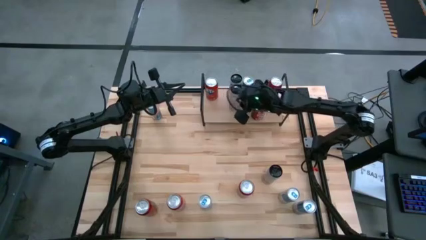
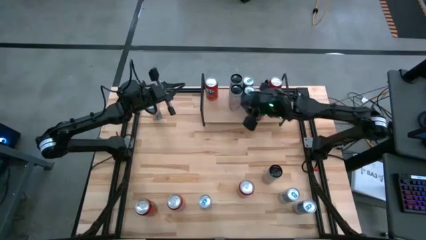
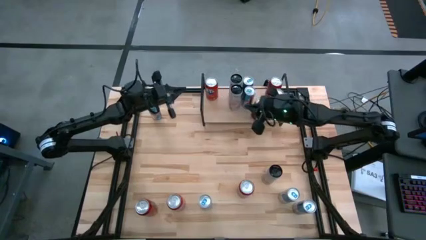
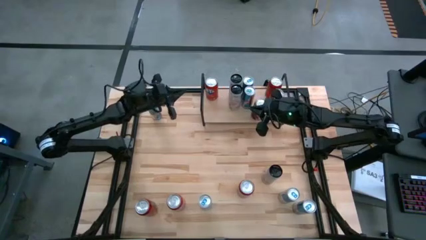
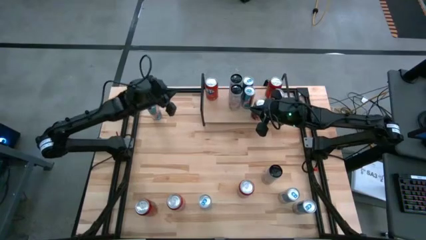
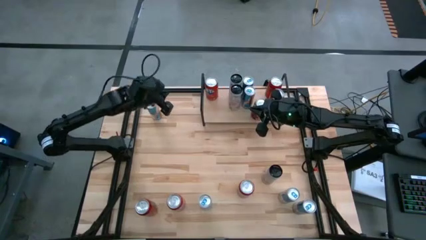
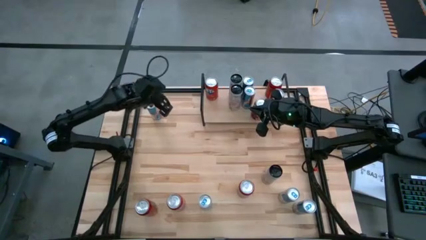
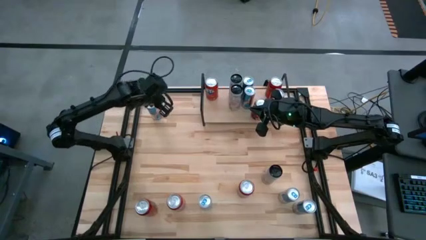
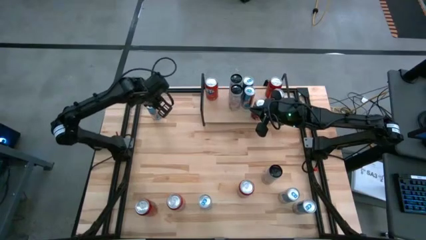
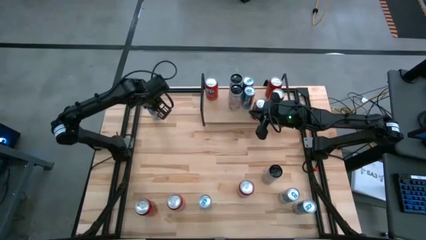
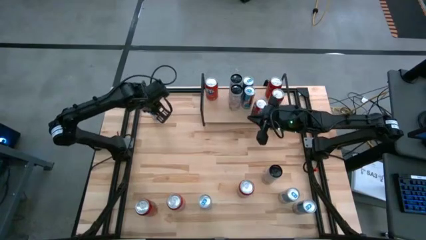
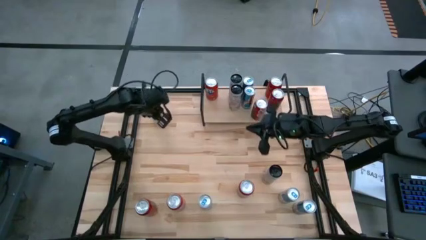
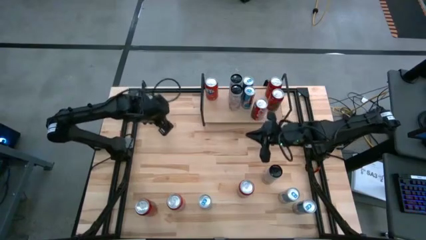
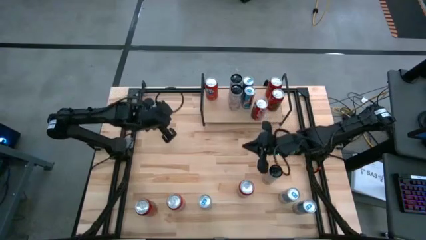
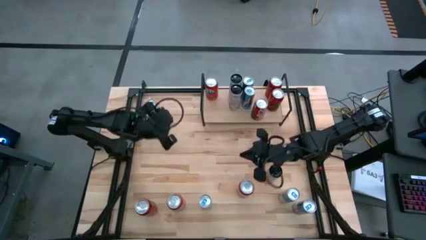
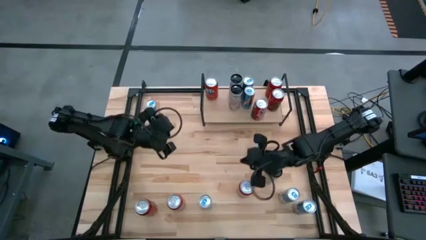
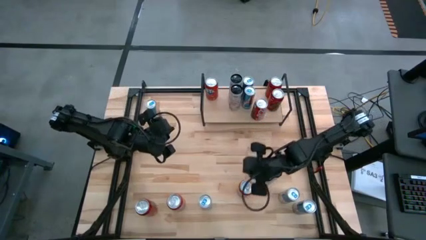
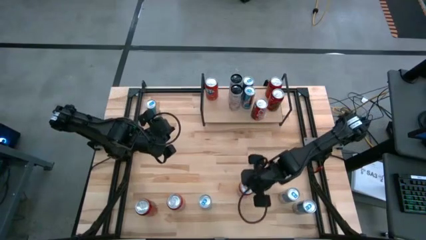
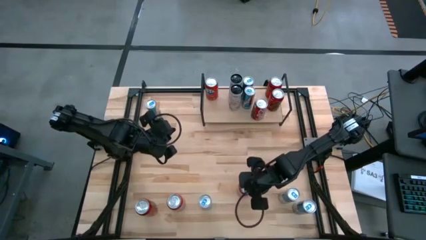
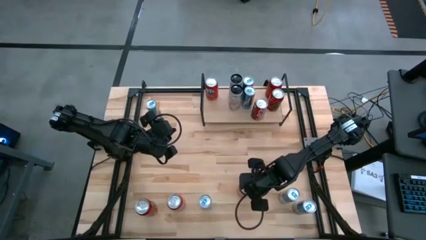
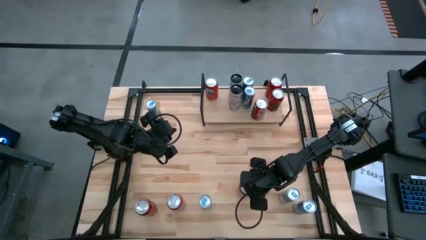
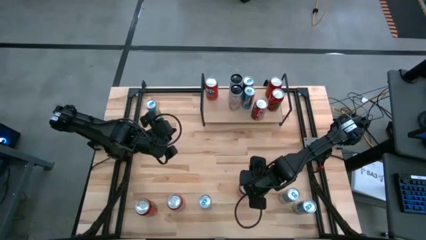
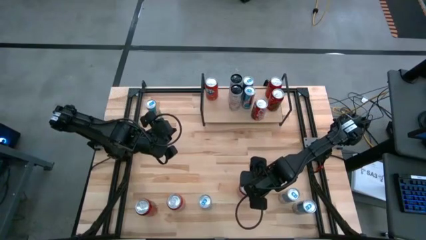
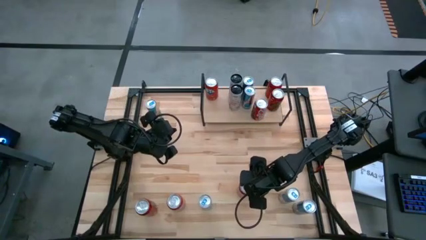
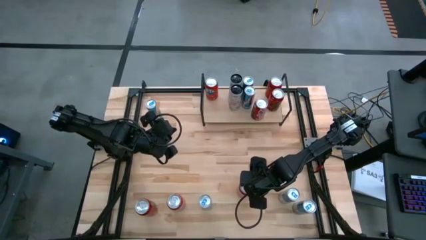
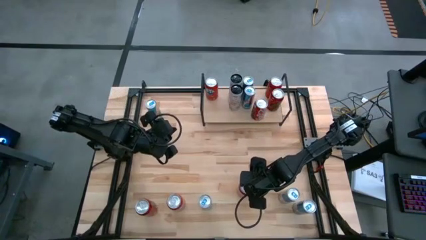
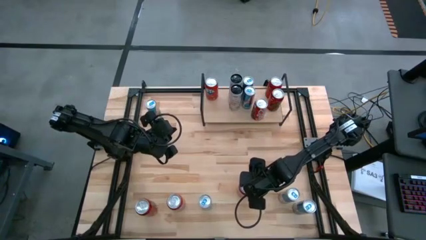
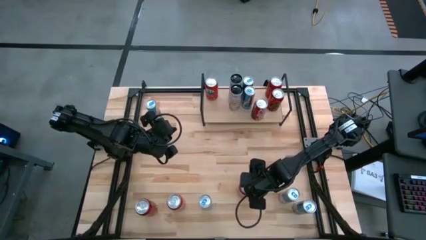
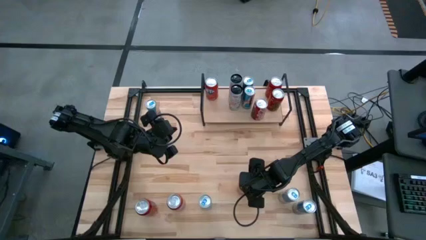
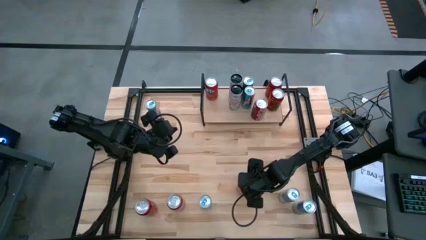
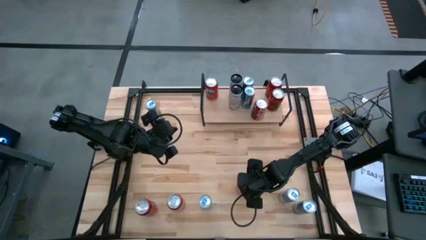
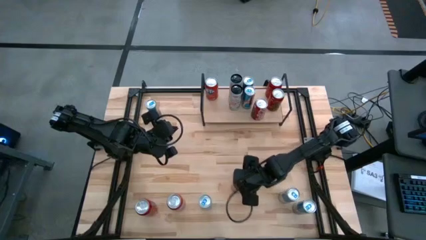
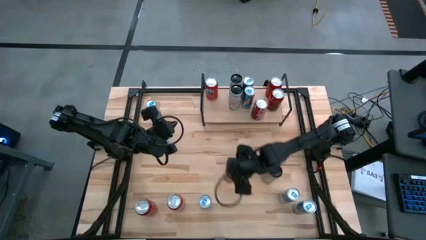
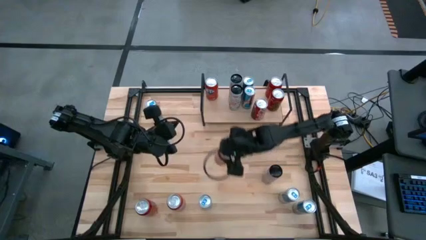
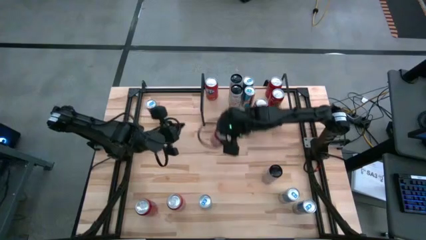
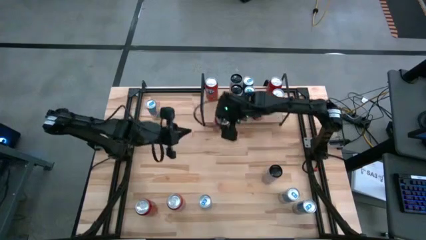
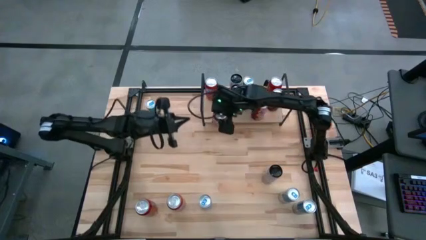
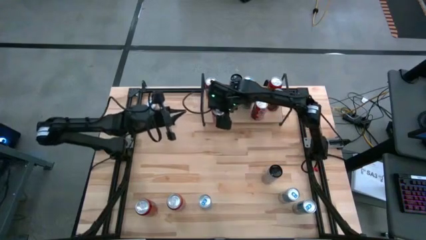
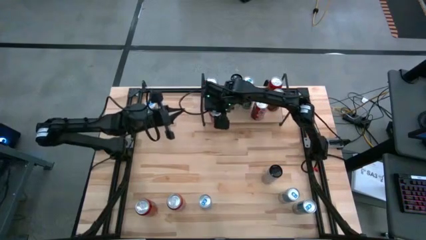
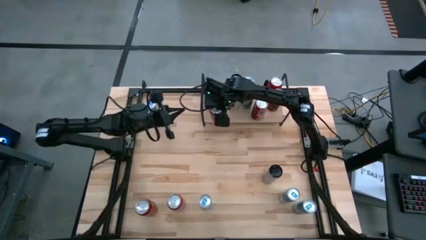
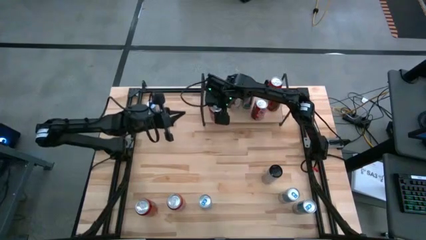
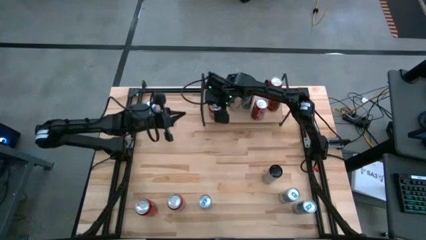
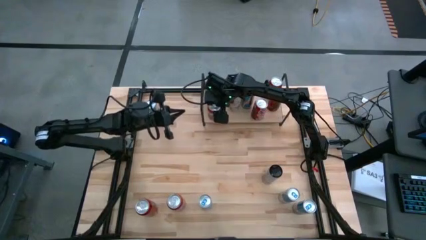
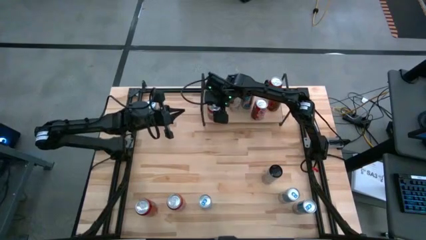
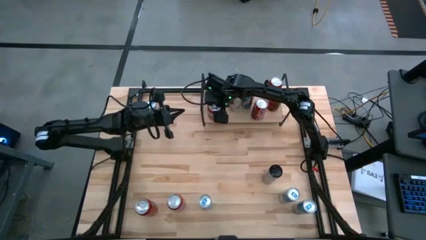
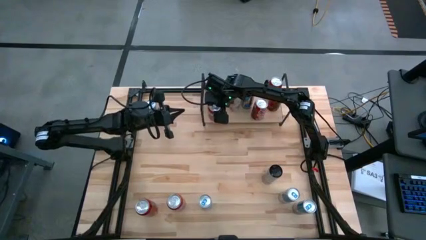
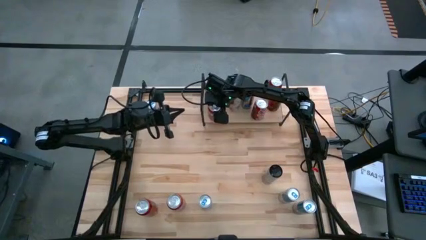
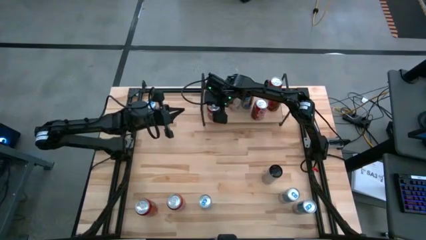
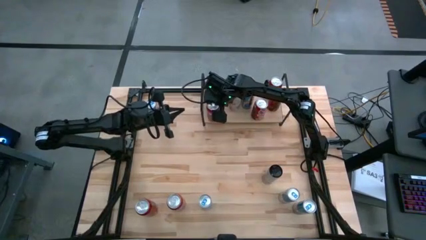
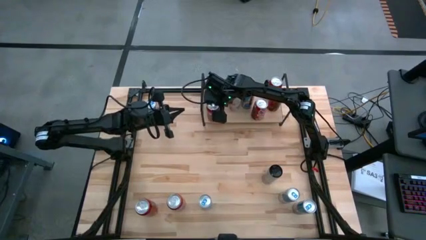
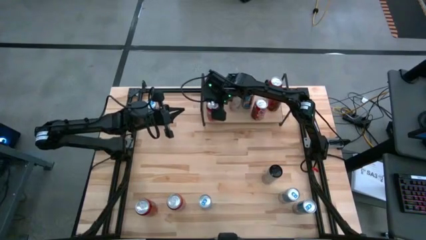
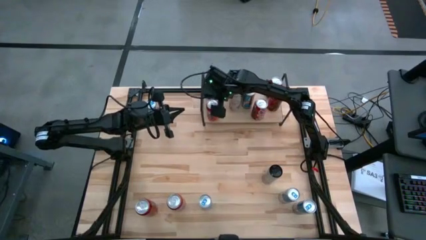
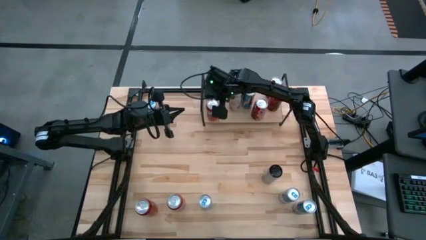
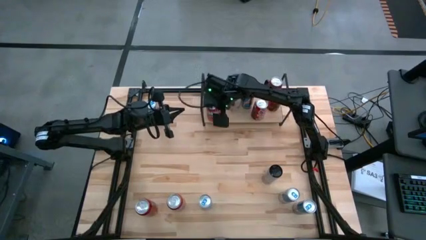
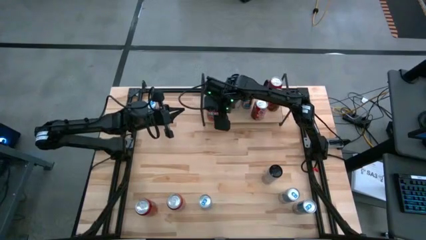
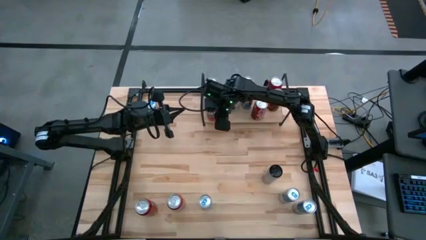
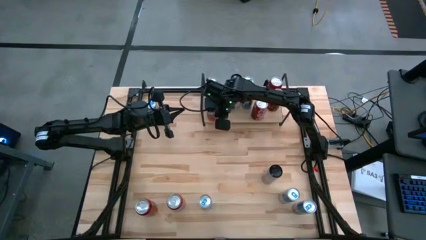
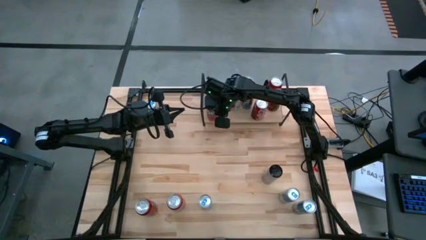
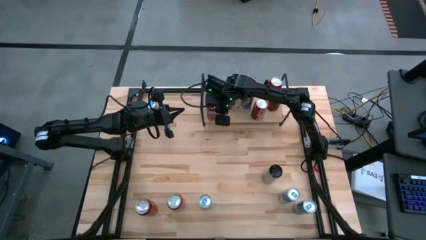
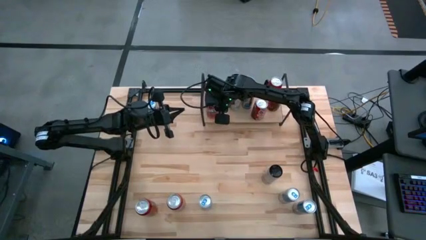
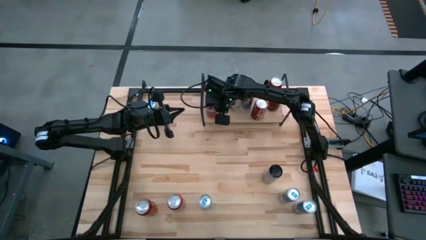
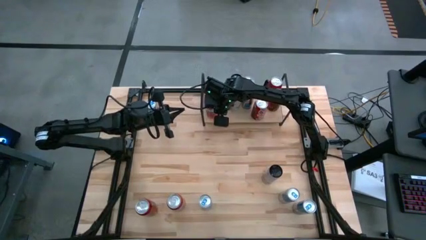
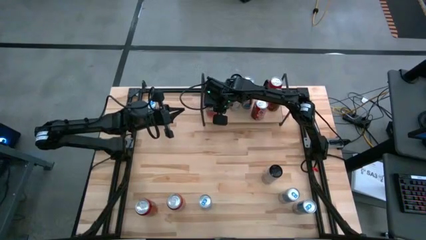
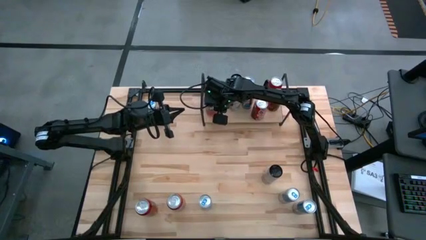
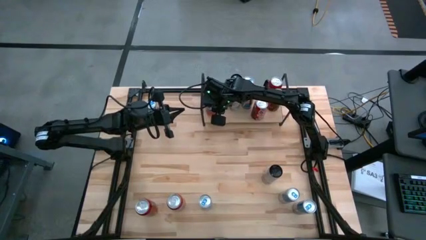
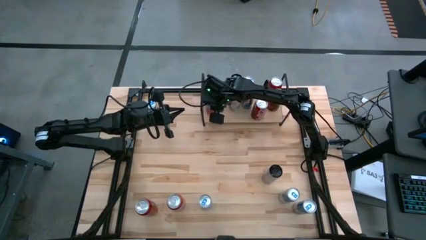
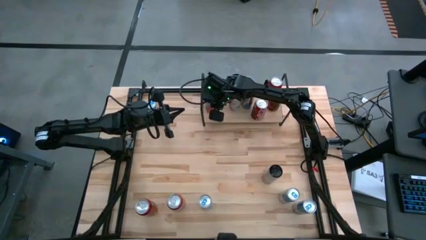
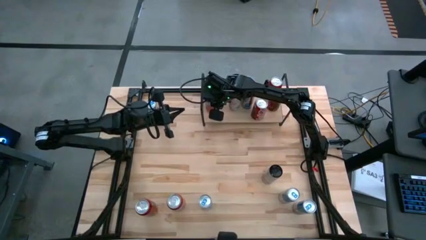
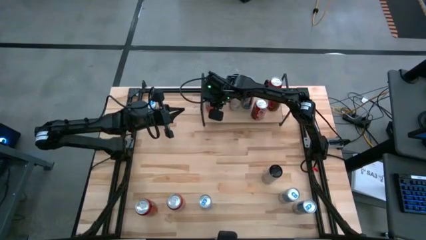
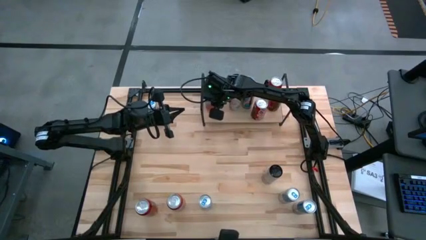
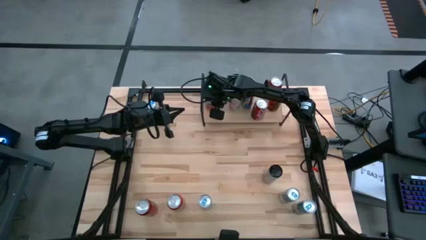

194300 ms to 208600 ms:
Task: Place canned beverage on shelf
Put the orange soda can on the shelf

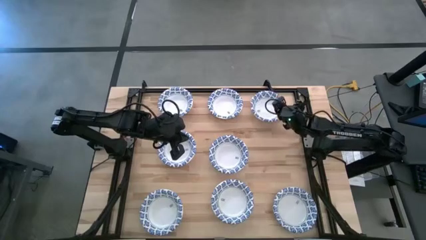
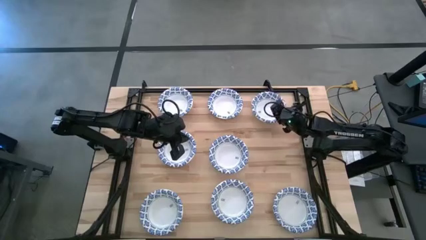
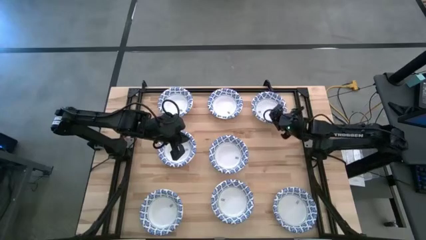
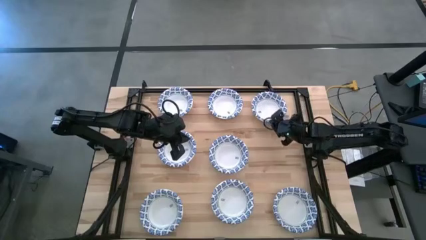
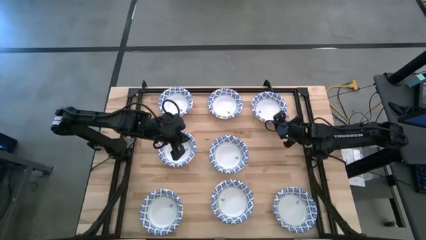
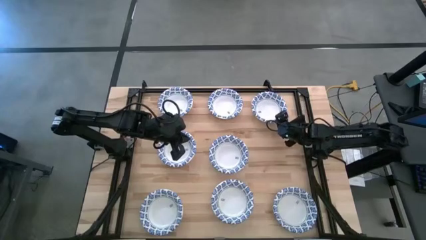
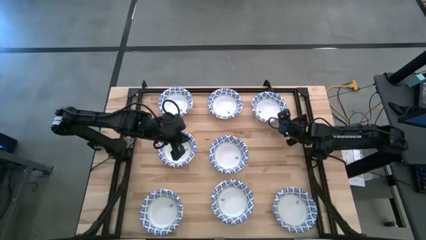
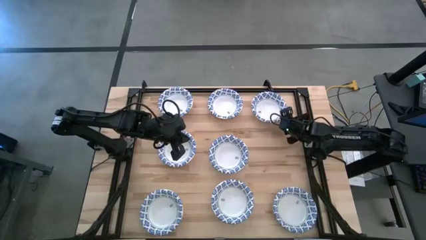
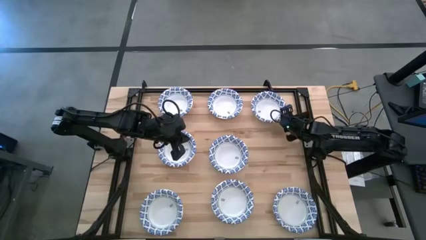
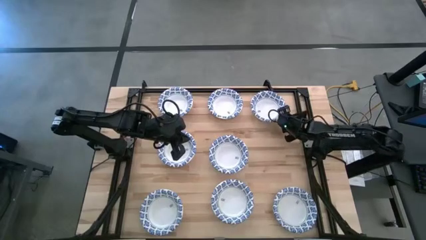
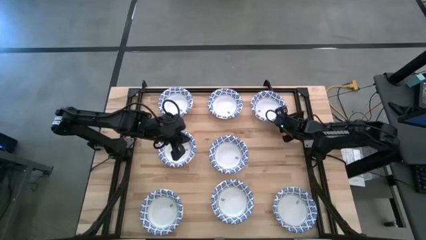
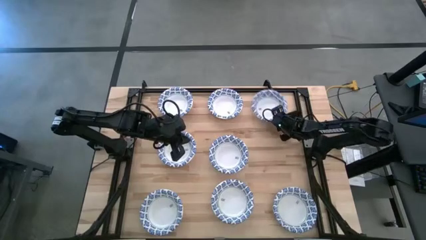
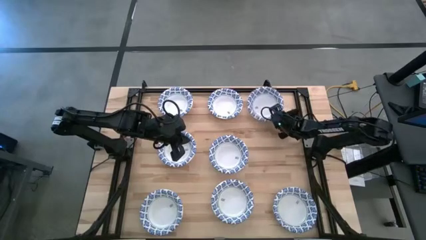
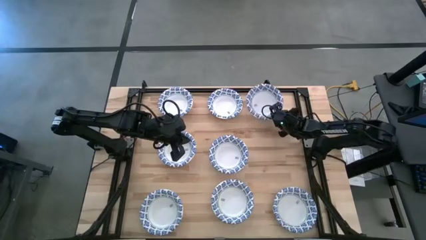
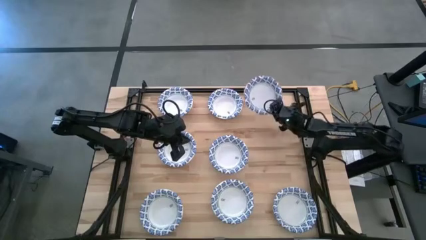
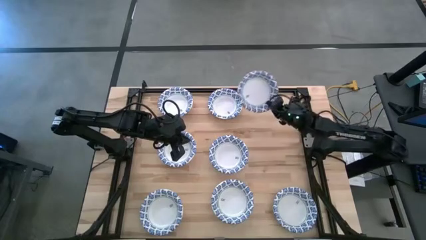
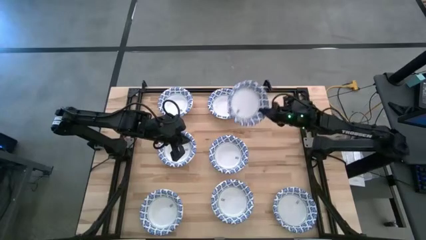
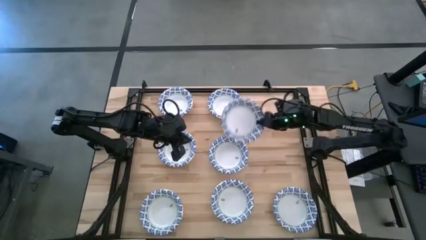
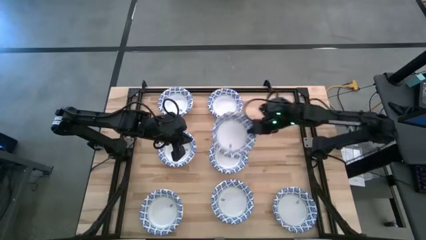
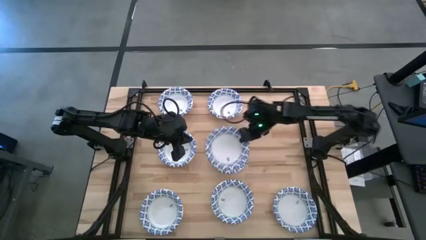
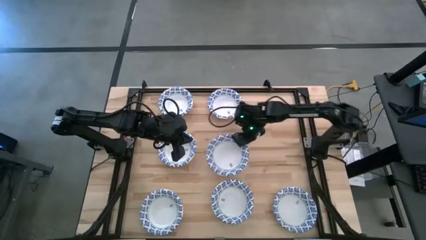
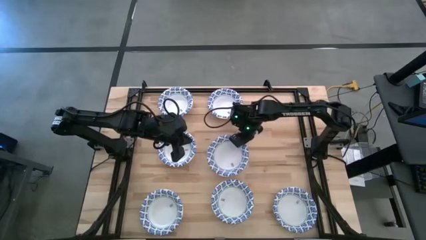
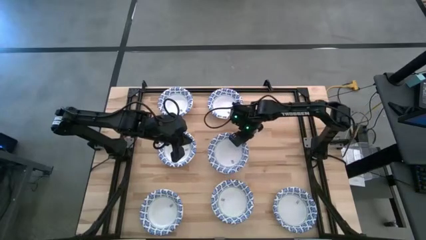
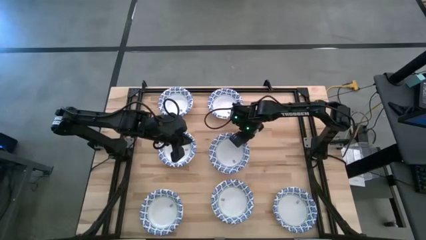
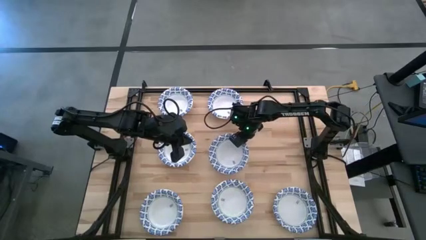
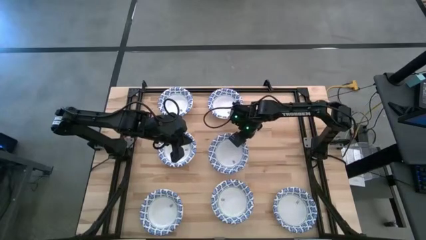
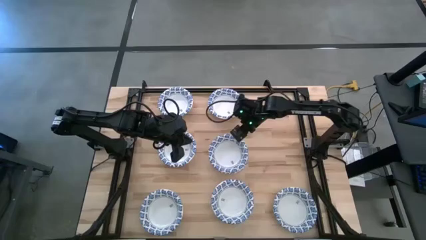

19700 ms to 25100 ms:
Task: Nest bowls inside each other
Stack the white patterned bowl on top of the center white patterned bowl
